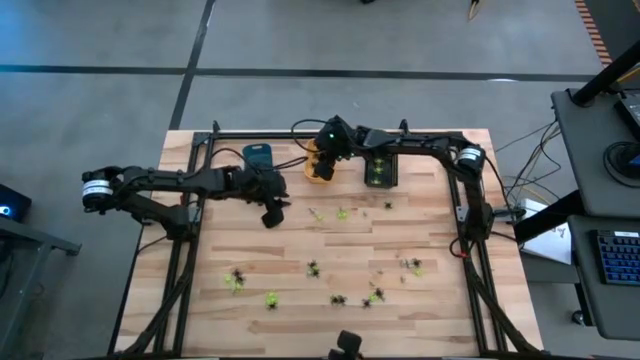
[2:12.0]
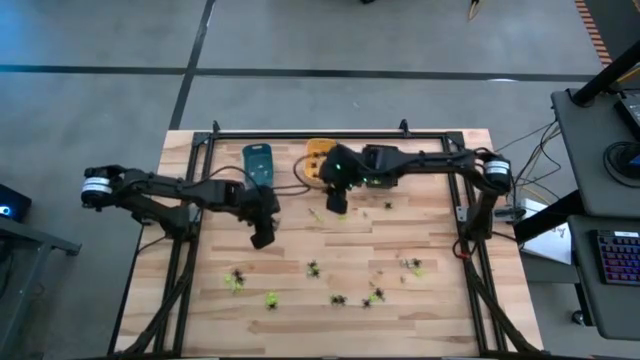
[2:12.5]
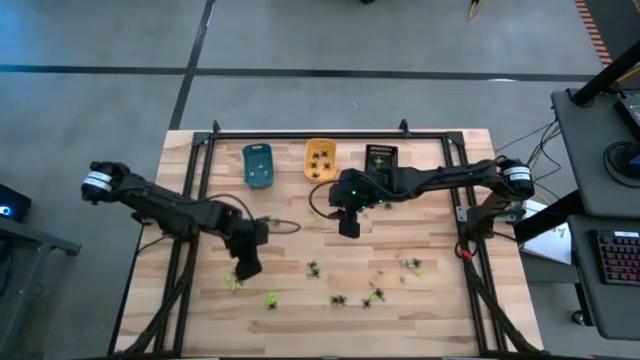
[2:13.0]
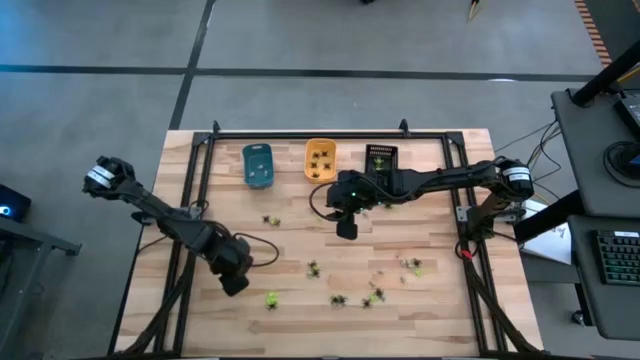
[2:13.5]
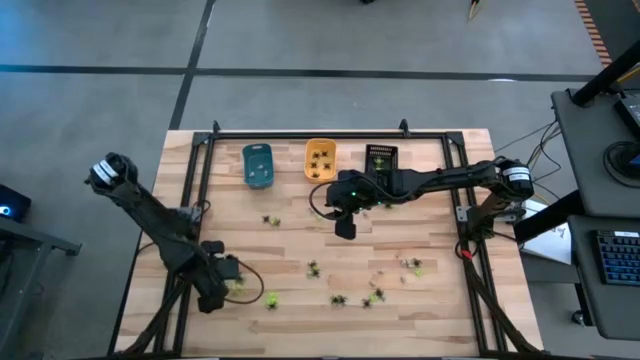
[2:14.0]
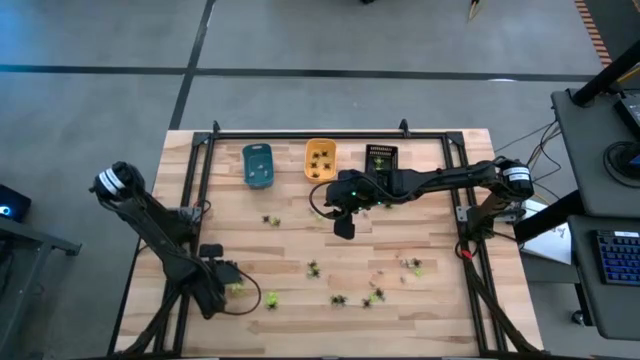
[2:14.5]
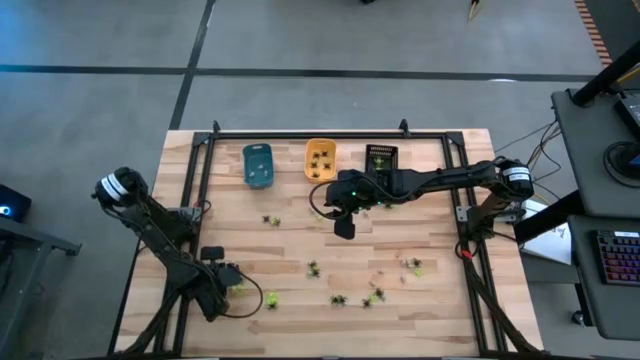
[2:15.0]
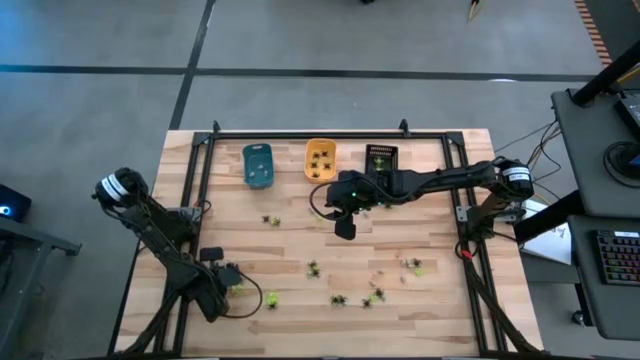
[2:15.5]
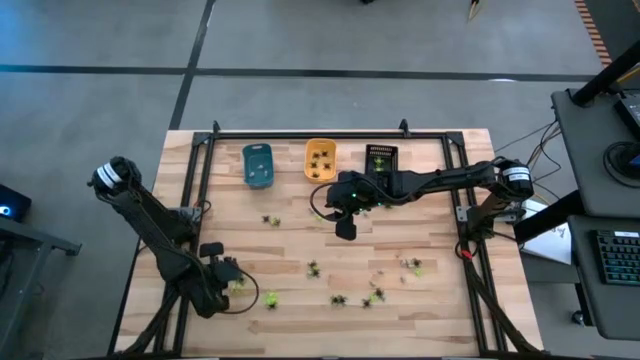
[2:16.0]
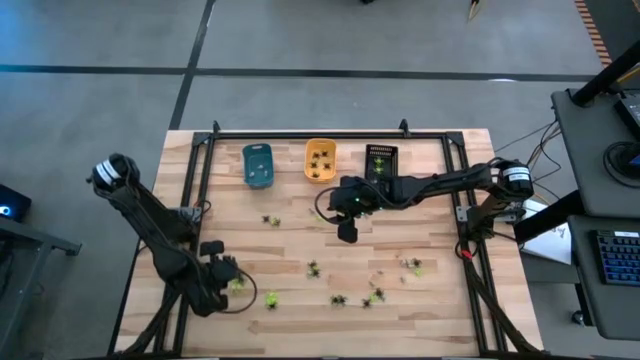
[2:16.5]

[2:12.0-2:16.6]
Task: Sort Halloween decoration
Put the green spider toy into the black bin

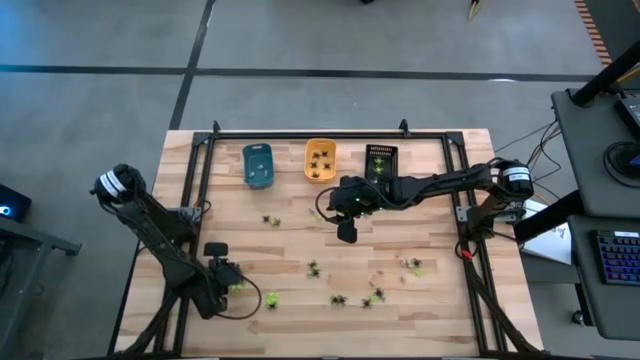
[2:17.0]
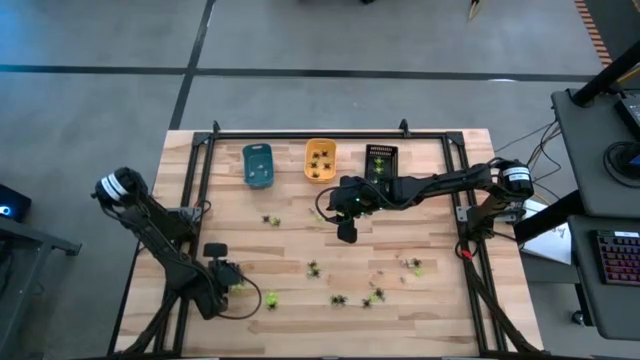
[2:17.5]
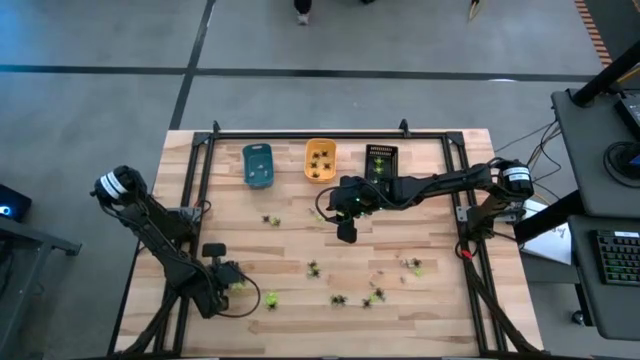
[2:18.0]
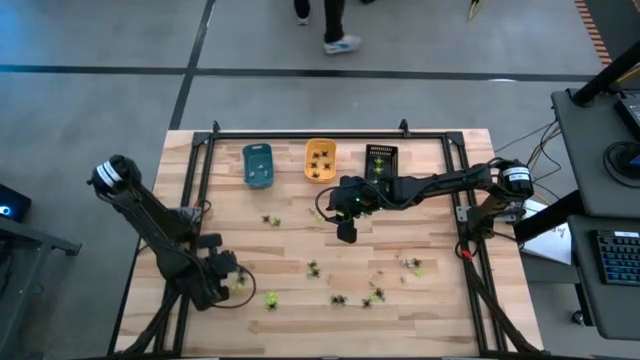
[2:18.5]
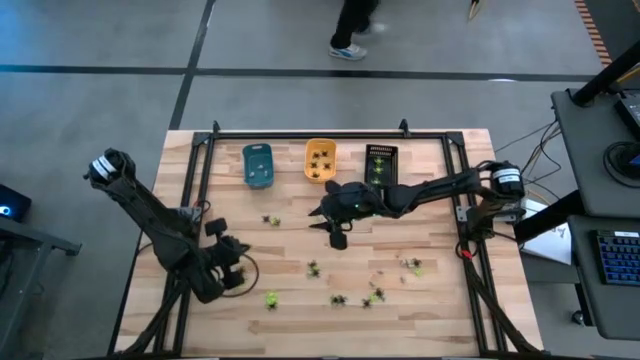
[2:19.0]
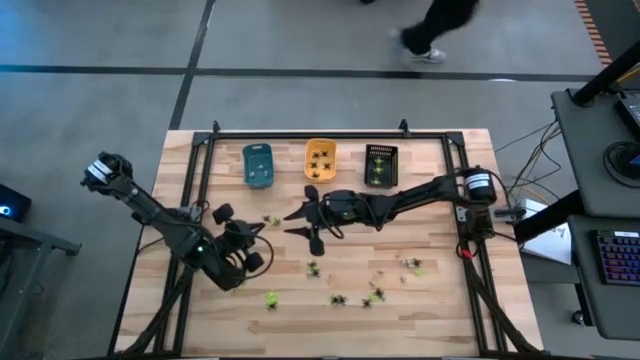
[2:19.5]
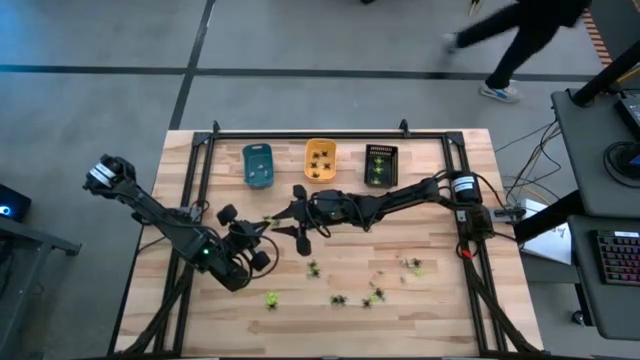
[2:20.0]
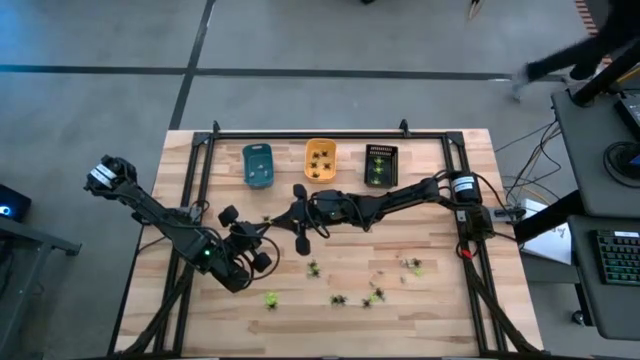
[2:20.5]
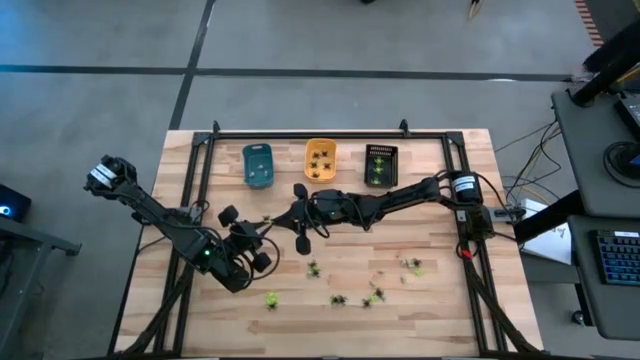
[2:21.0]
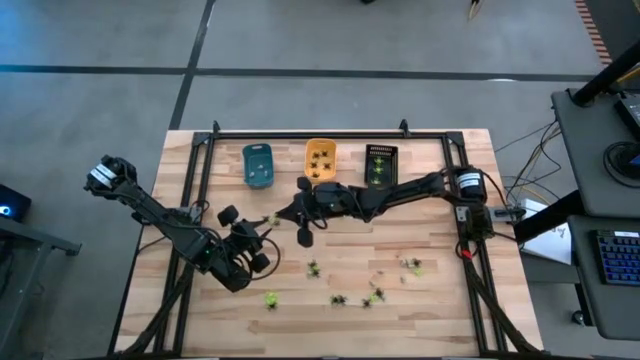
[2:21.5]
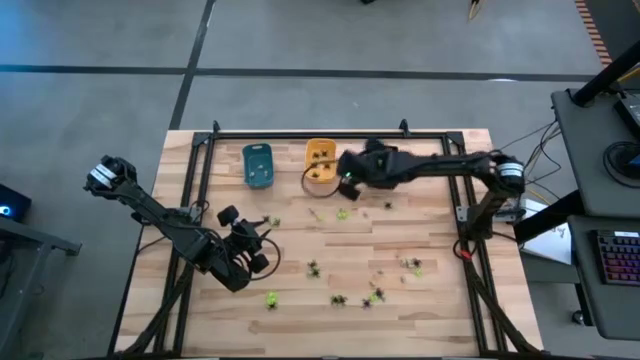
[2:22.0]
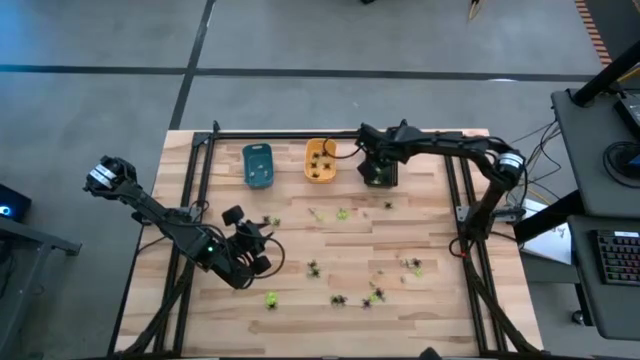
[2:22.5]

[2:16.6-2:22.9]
Put the green spider toy into the black bin

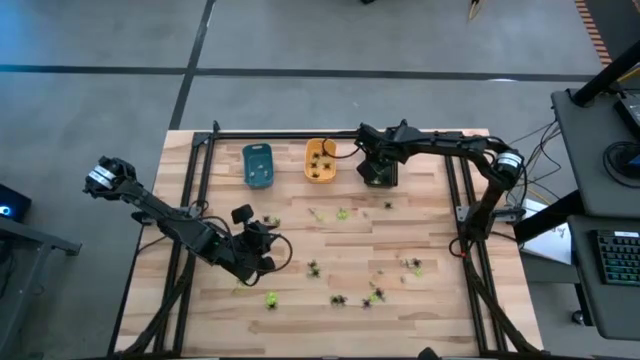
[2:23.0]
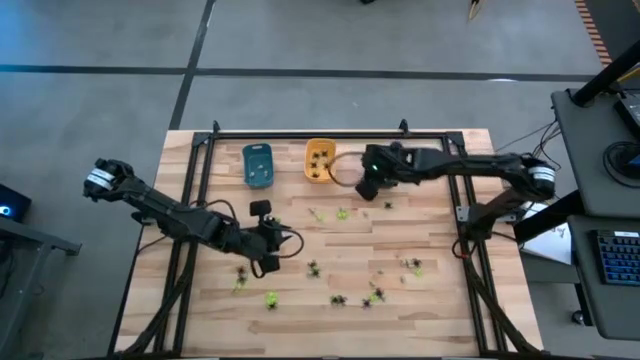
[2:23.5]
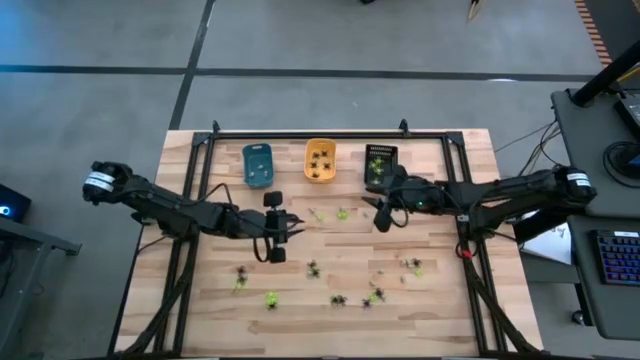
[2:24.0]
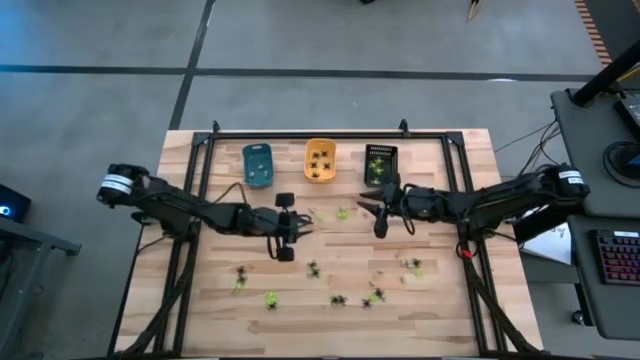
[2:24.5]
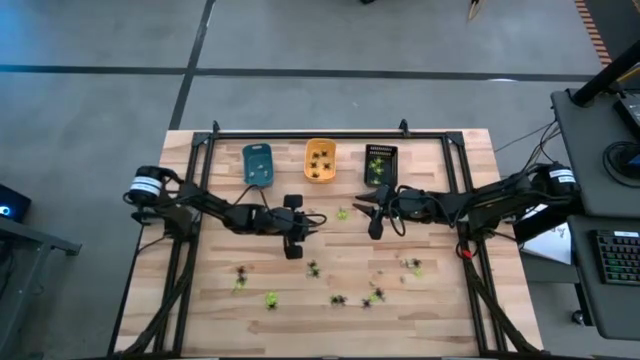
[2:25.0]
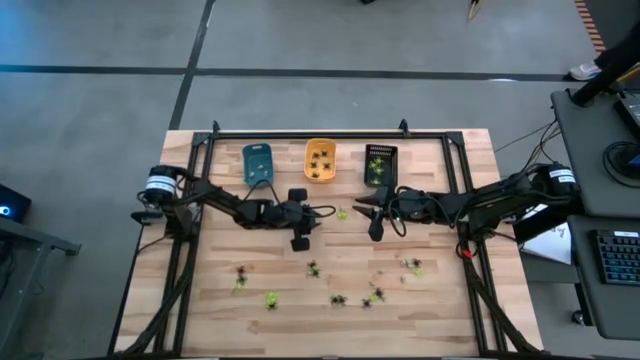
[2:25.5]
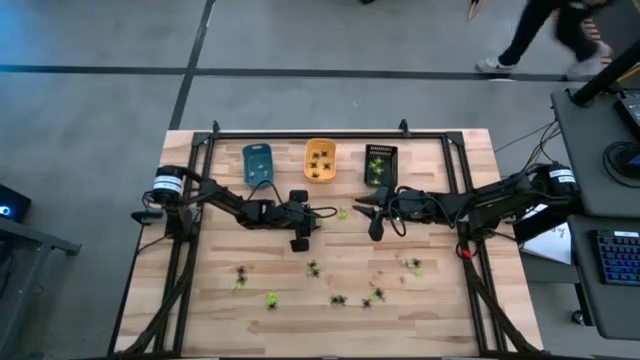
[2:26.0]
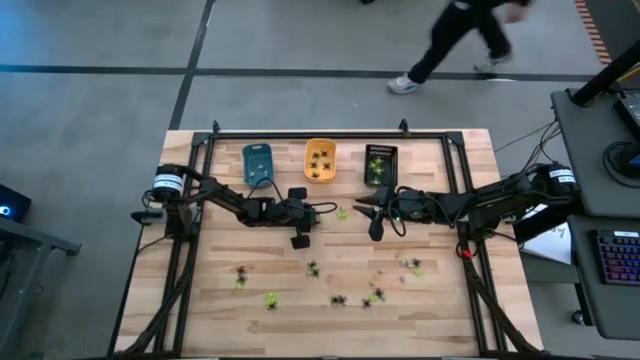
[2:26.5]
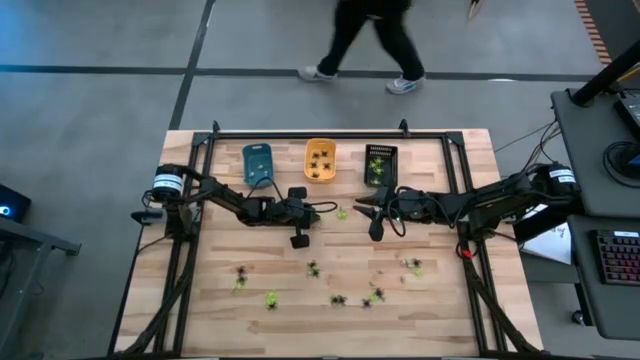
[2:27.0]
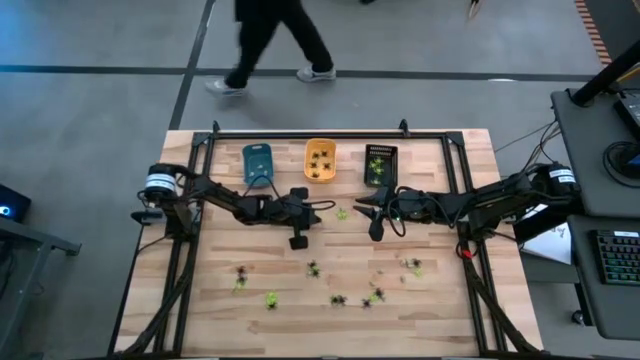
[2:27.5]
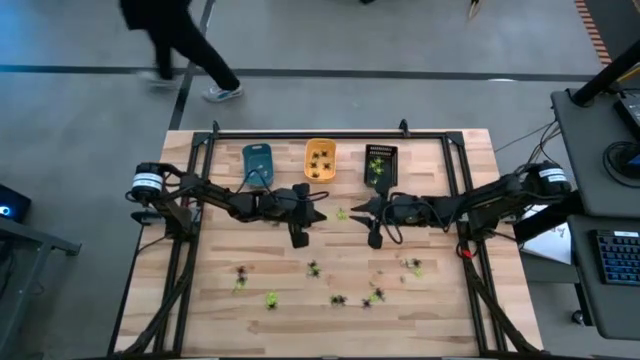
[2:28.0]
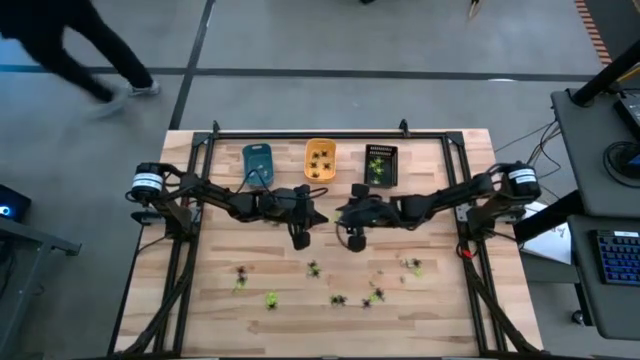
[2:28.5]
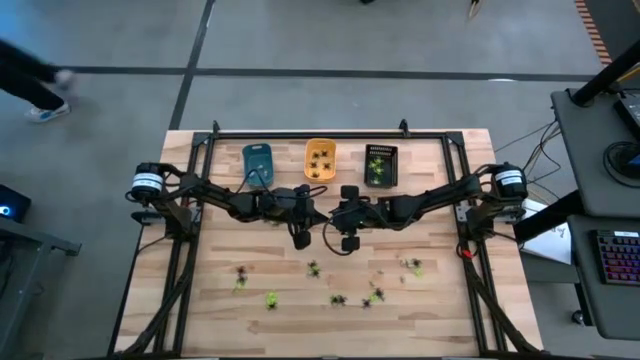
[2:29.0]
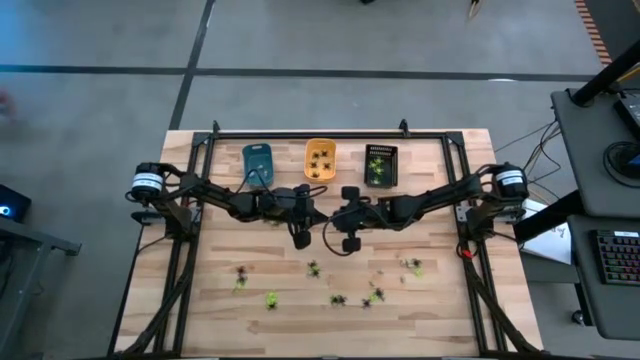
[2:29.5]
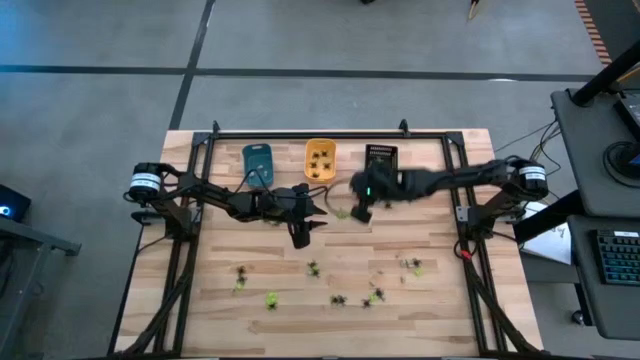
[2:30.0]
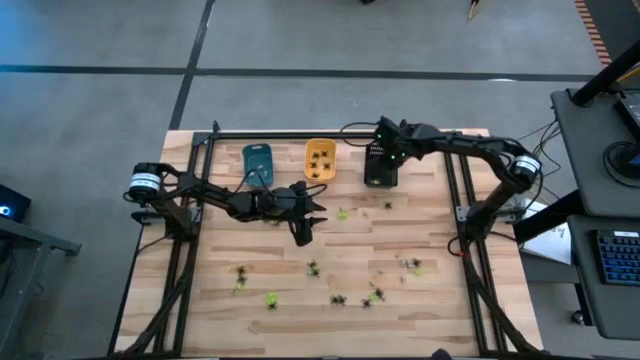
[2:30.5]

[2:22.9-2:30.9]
Put the green spider toy into the black bin

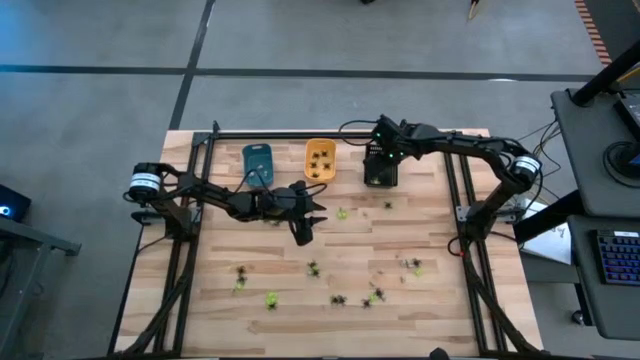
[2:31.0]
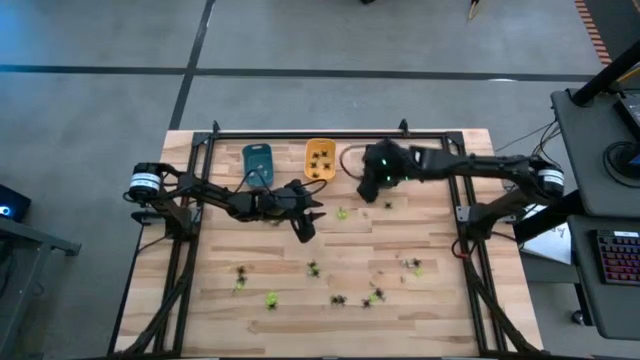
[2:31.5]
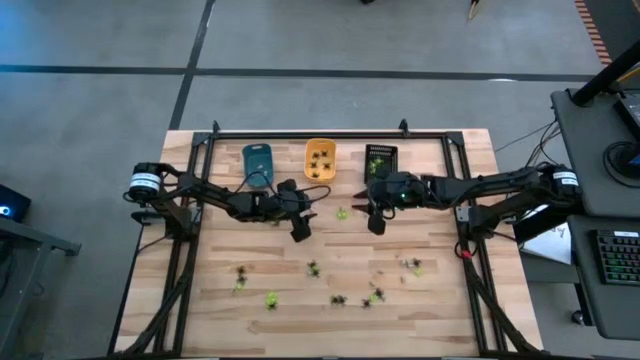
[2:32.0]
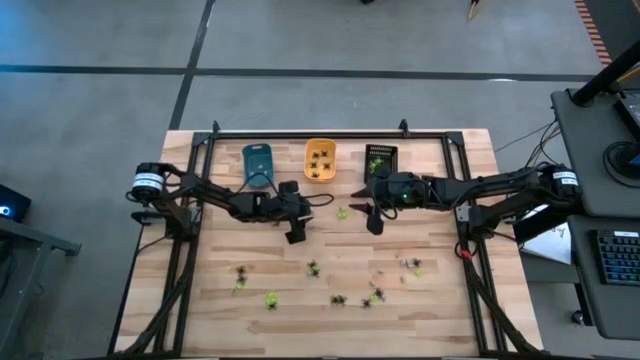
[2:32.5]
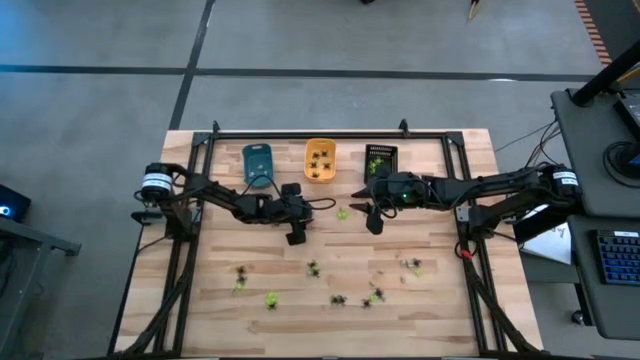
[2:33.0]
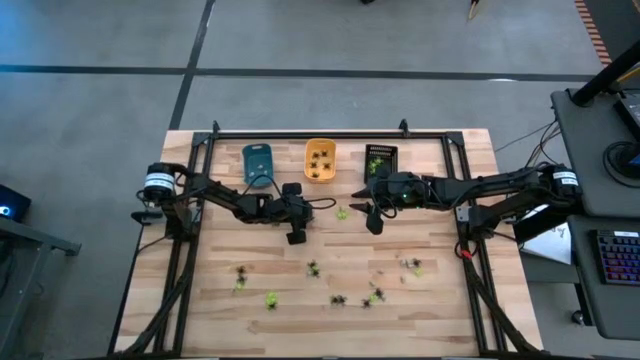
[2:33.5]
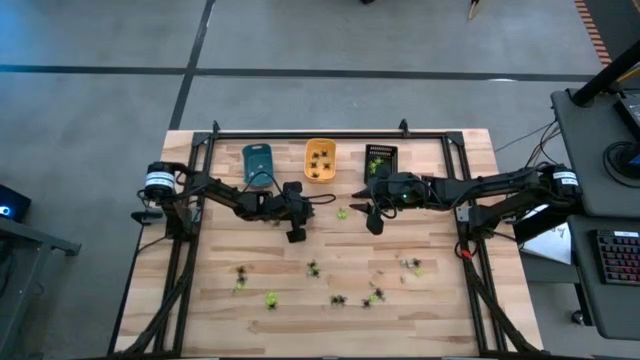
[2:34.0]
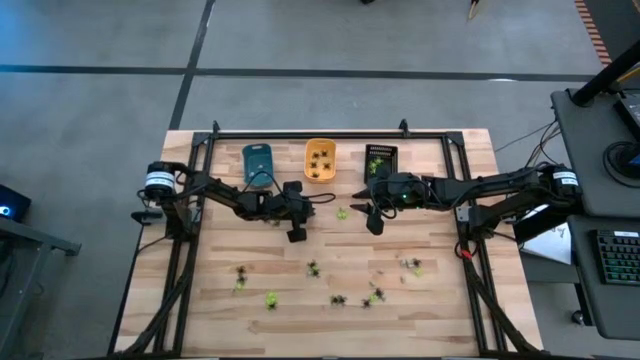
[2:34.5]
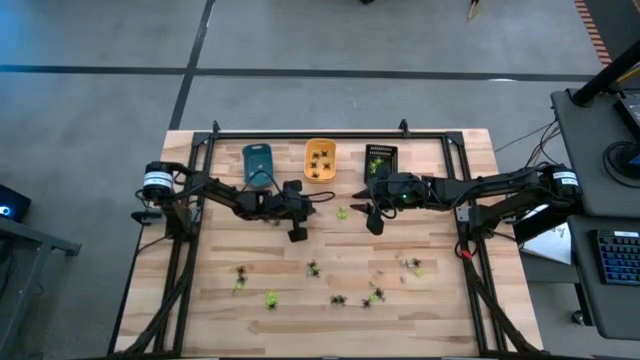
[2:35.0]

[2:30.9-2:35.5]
Put the white skull toy into the blue bin
